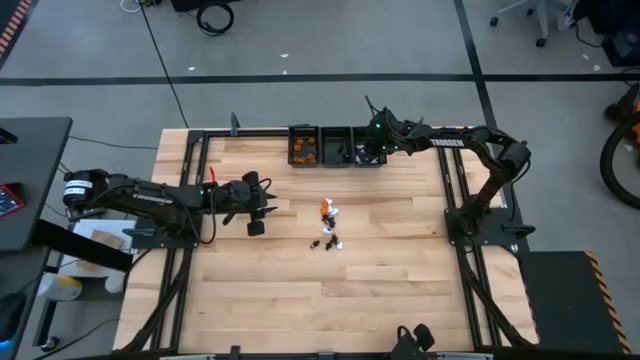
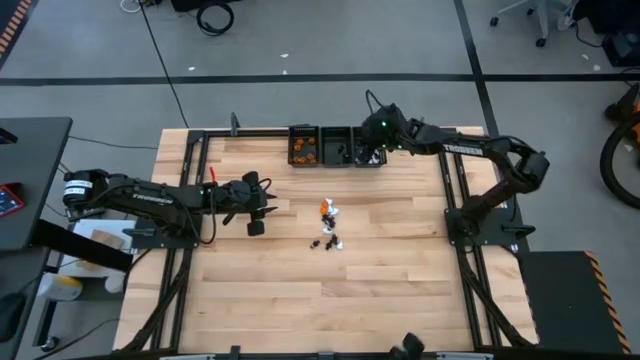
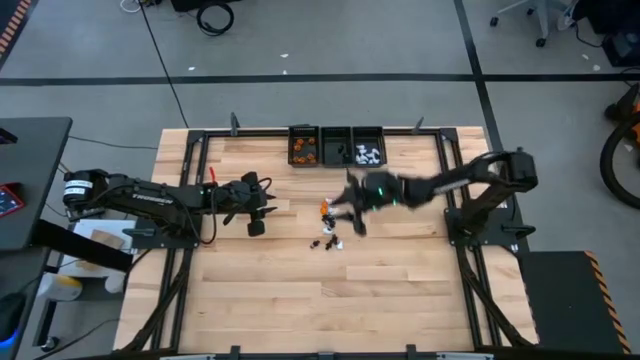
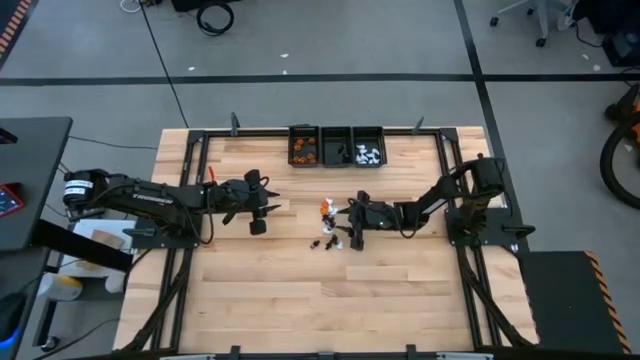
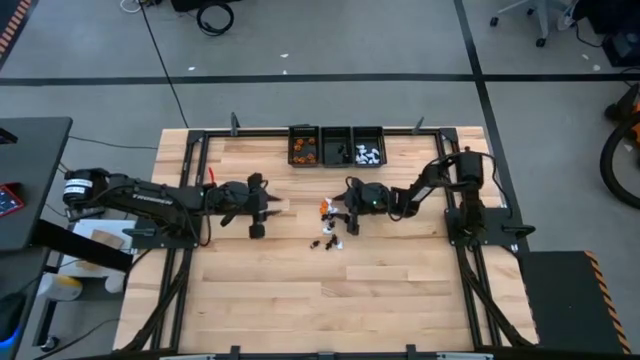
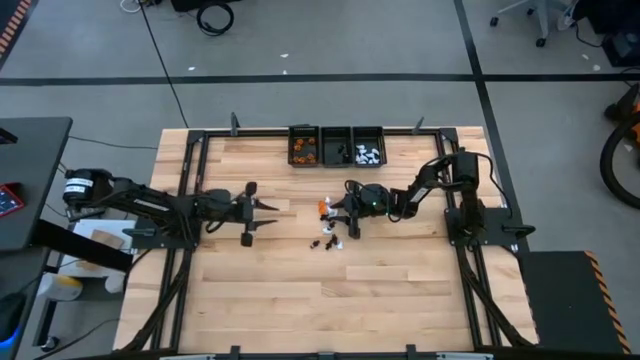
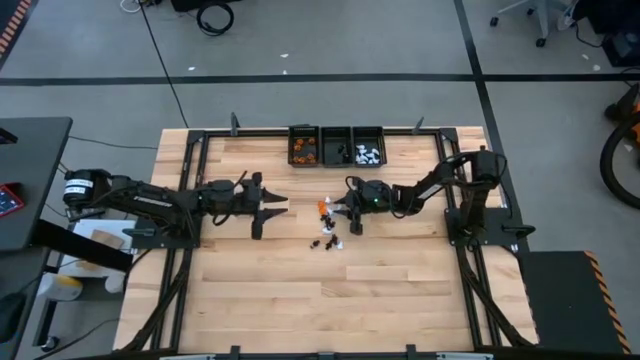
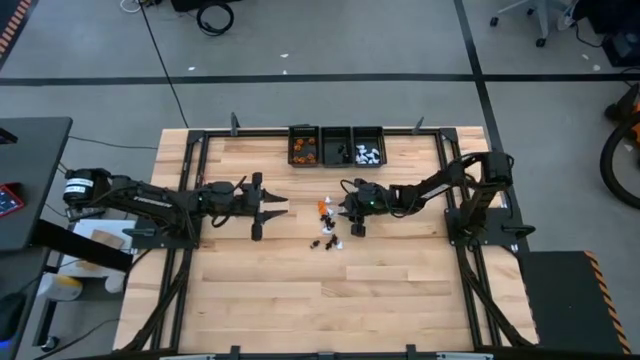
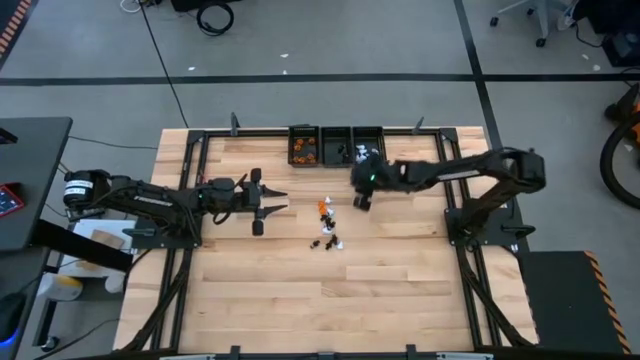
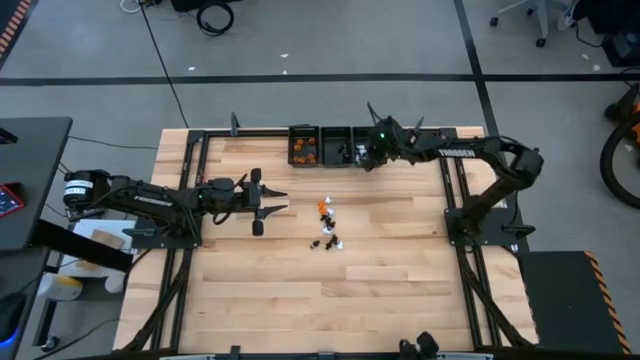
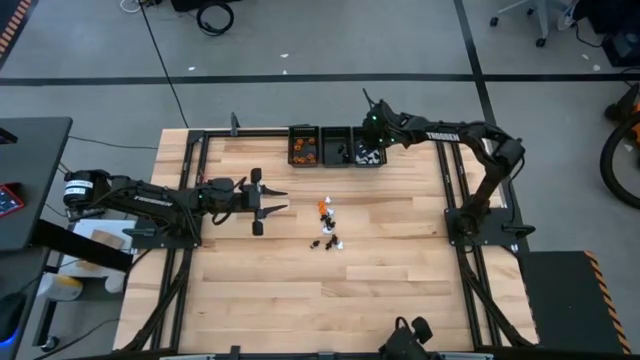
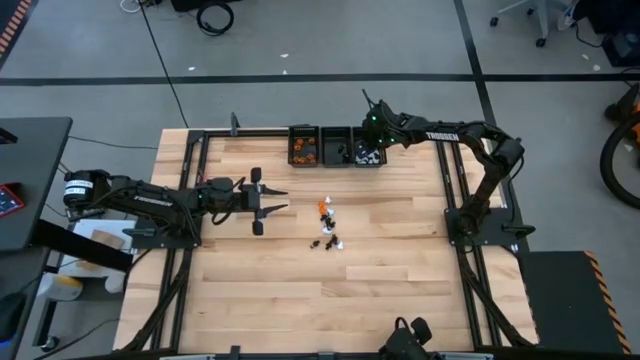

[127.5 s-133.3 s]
Task: Sort game pieces by color
Put the white game piece into the right black basket

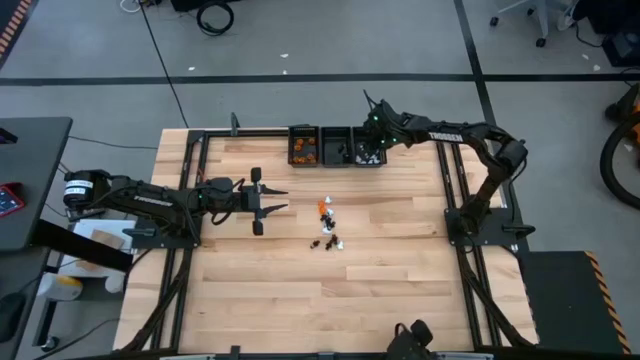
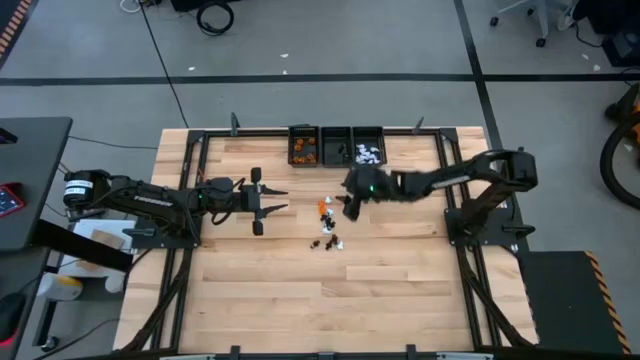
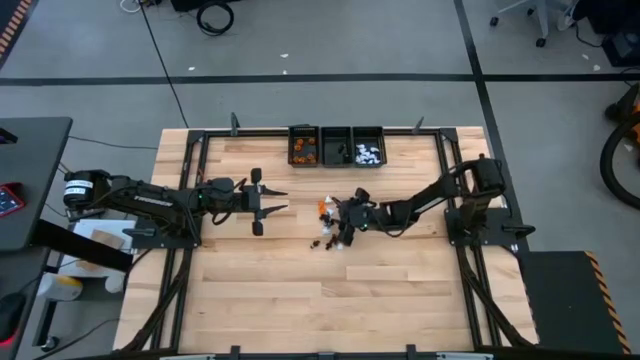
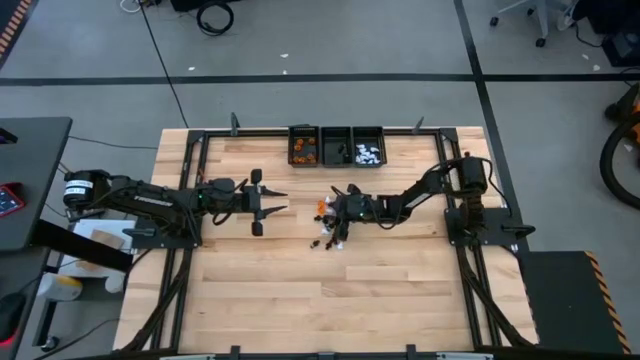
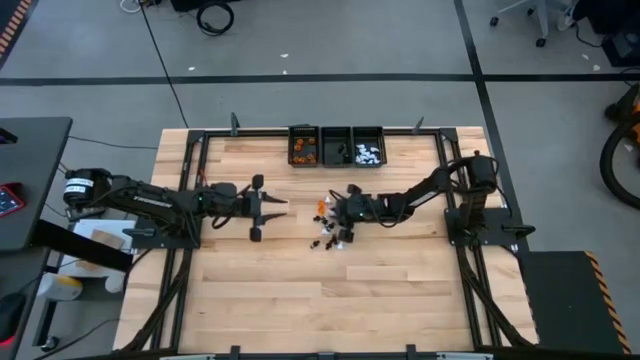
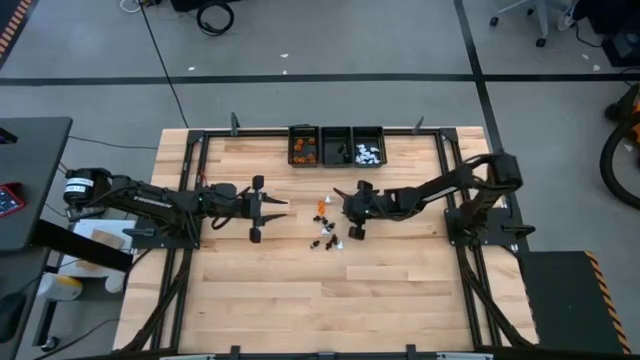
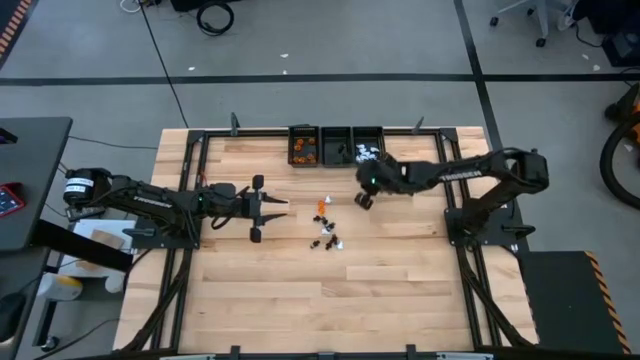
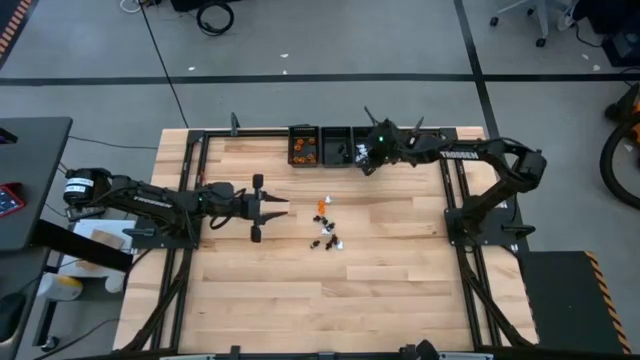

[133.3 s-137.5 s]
Put the white game piece into the right black basket

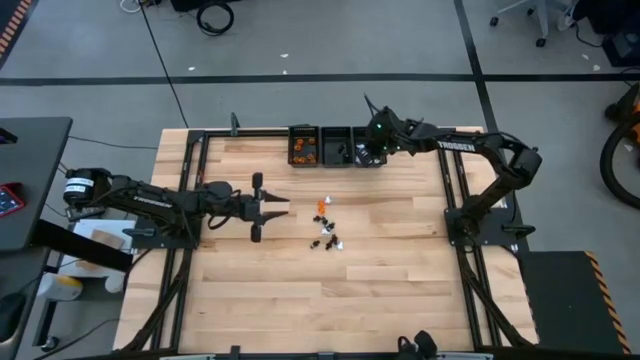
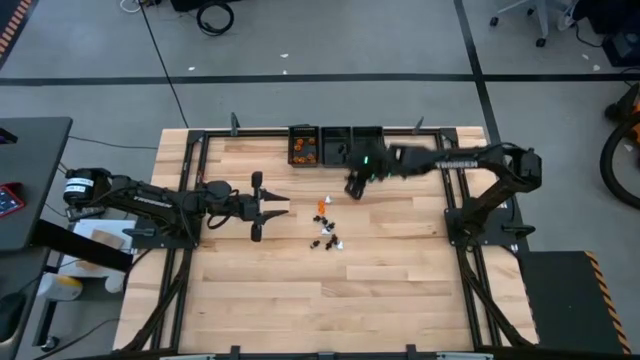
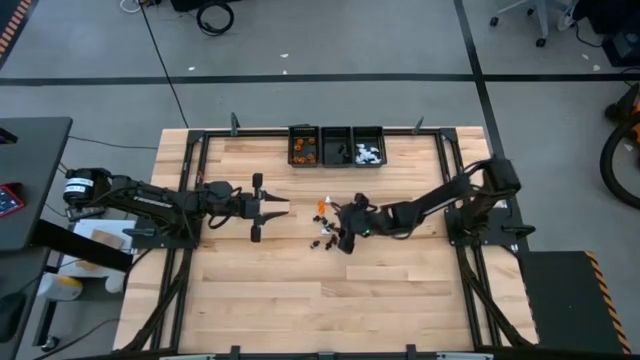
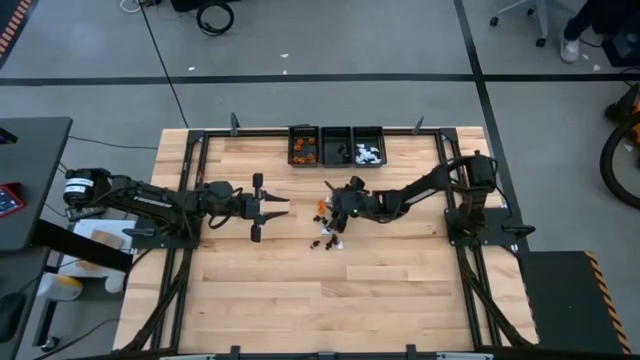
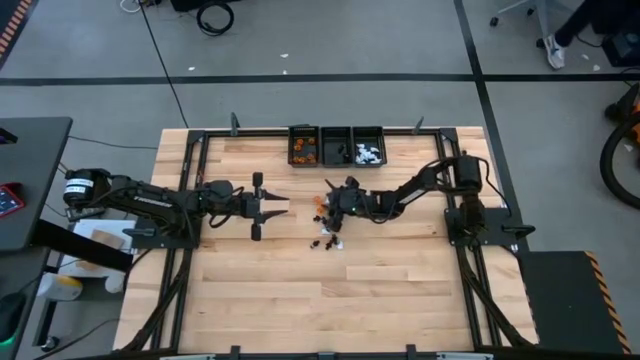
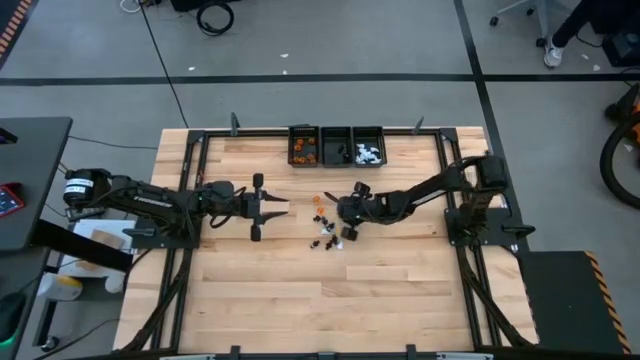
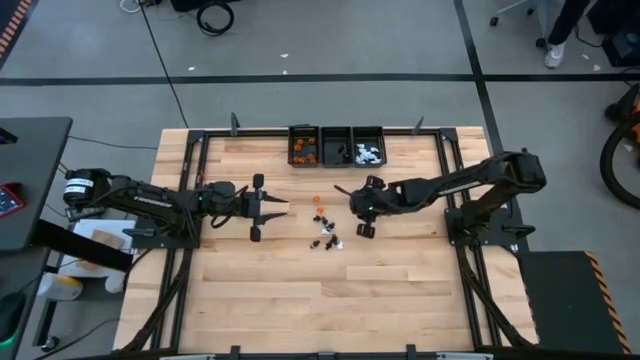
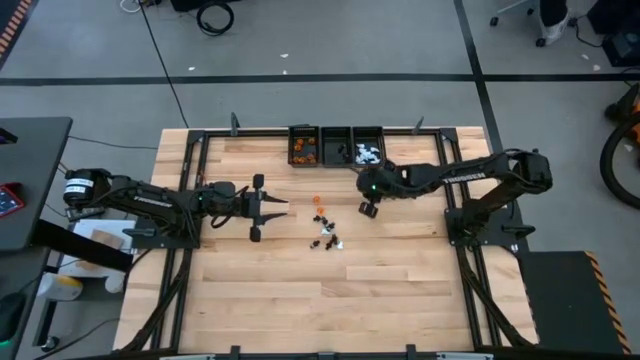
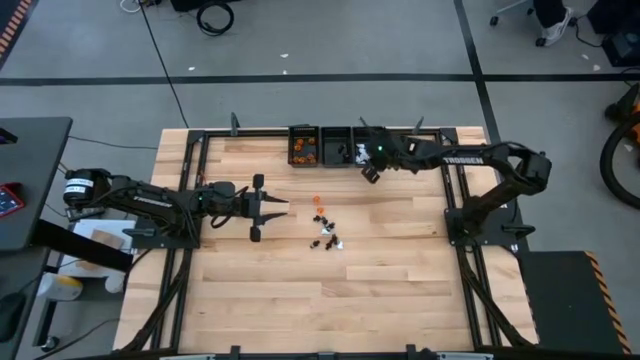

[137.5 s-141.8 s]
Put the white game piece into the right black basket

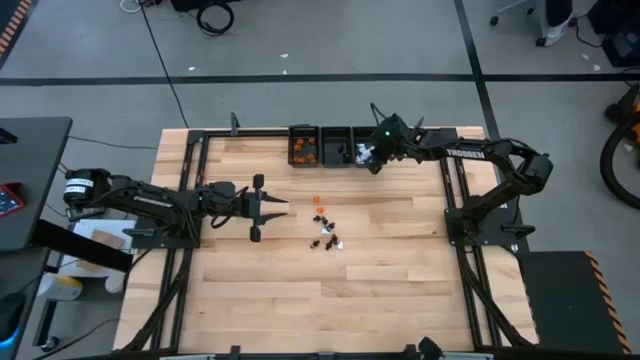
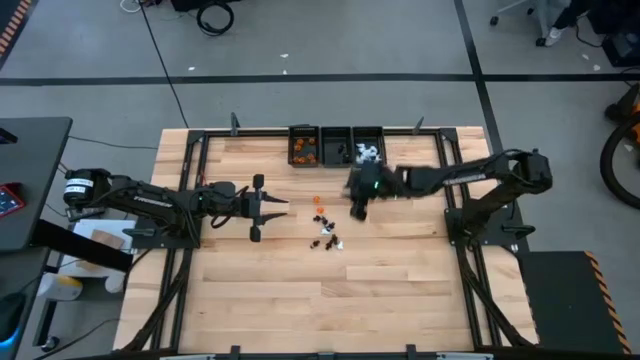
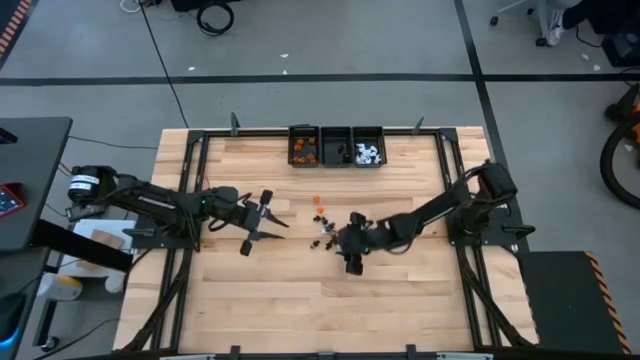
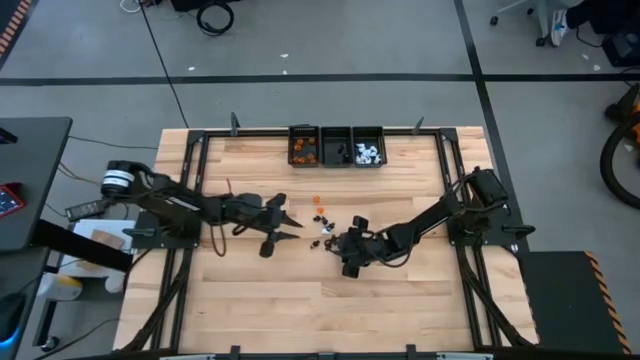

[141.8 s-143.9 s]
Put the white game piece into the right black basket

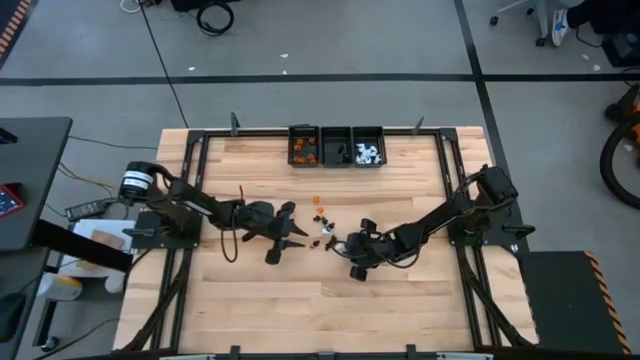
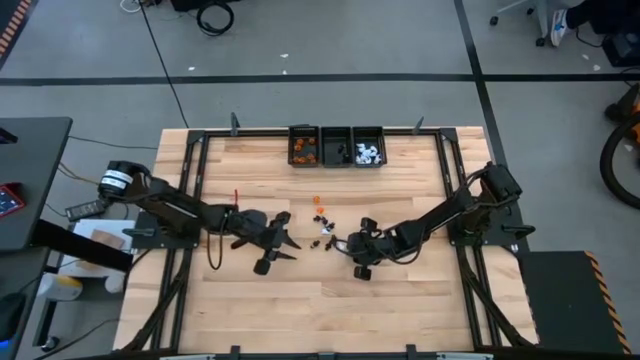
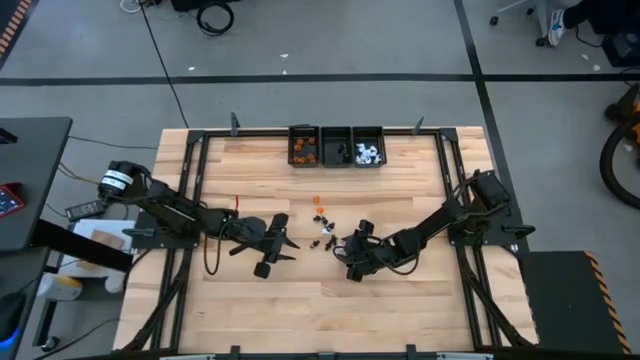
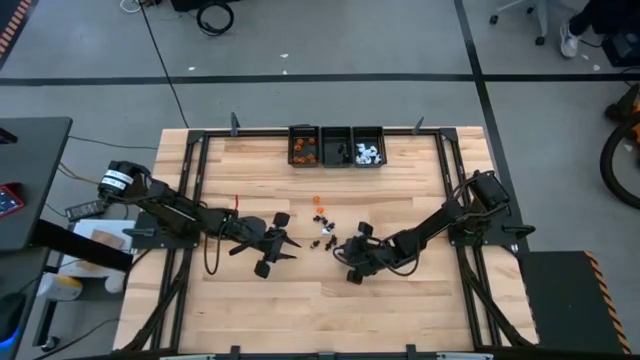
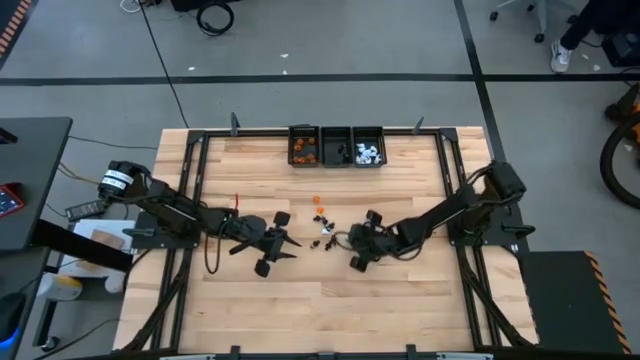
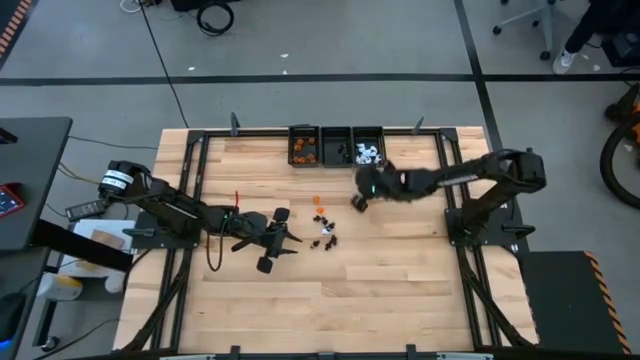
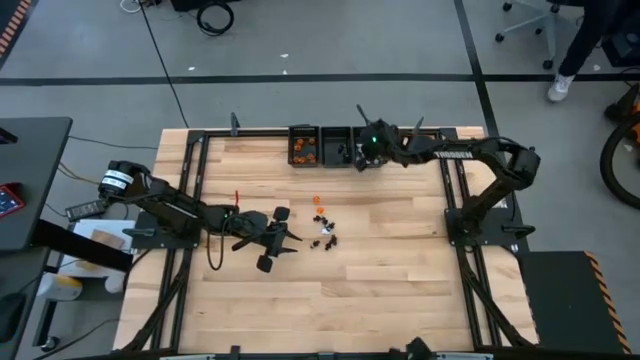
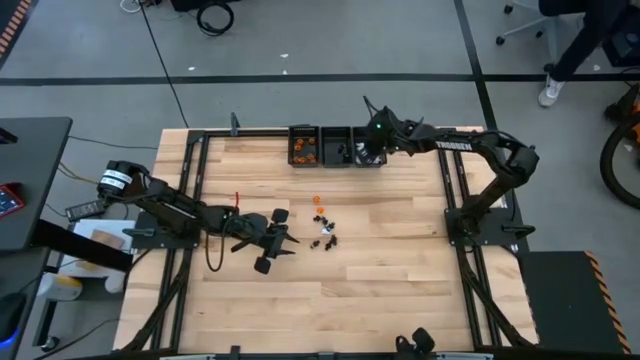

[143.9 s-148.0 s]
Put the white game piece into the right black basket

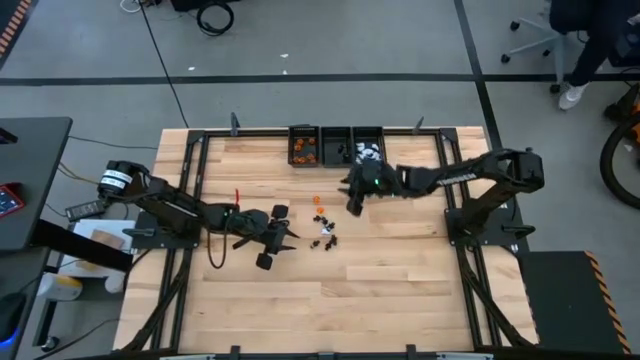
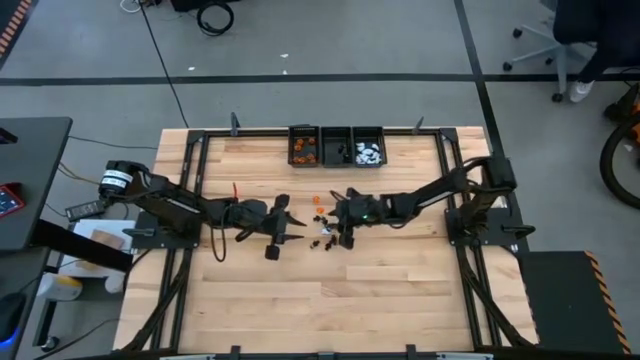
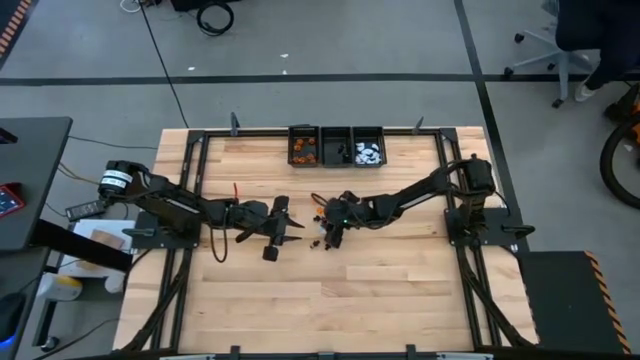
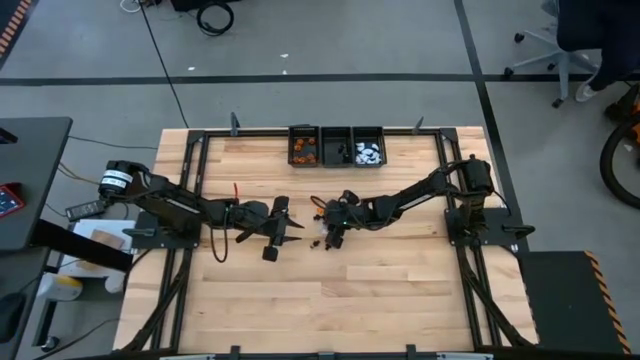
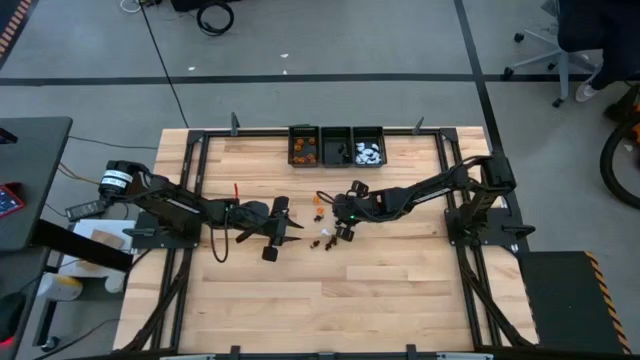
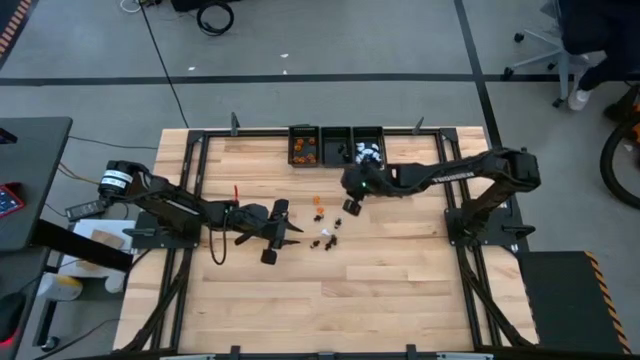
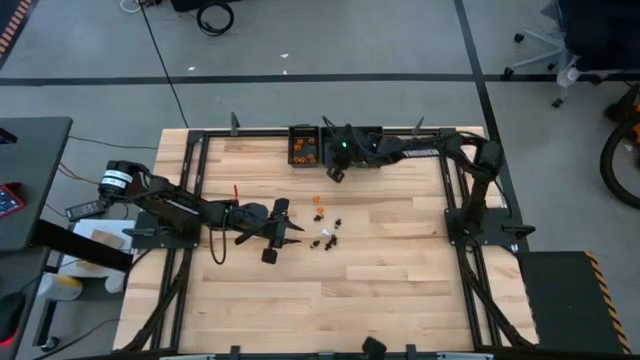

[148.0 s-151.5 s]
Put the black game piece into the center black basket
